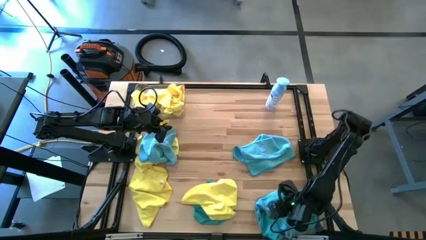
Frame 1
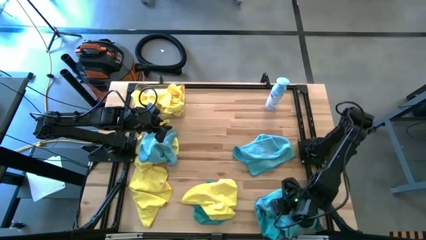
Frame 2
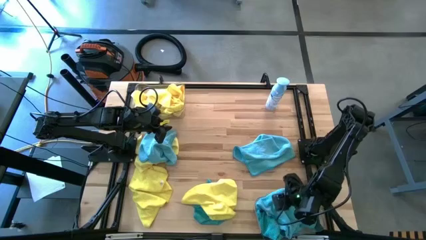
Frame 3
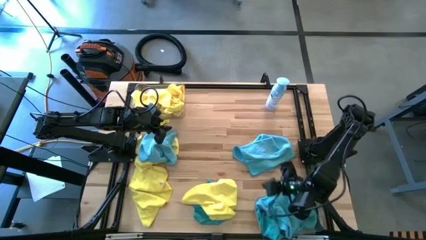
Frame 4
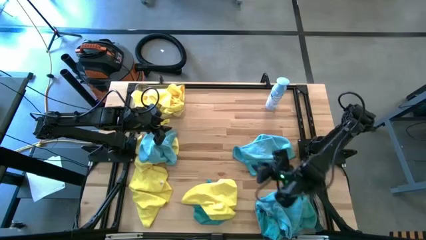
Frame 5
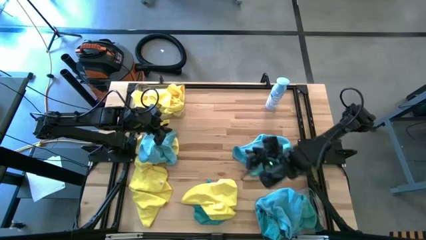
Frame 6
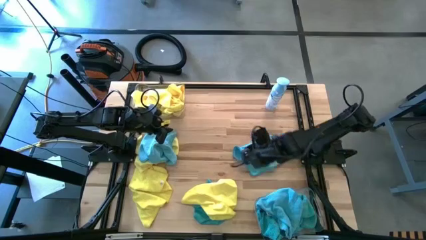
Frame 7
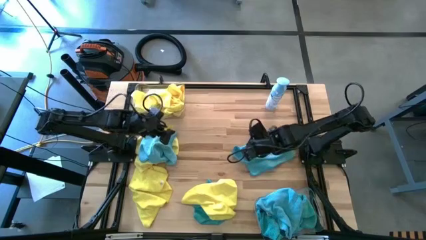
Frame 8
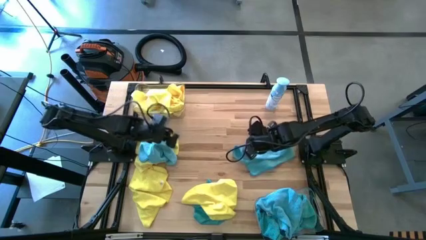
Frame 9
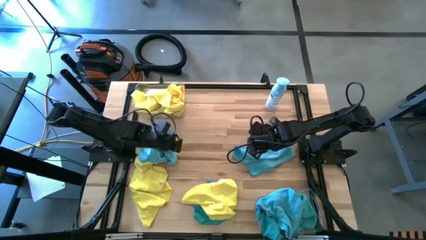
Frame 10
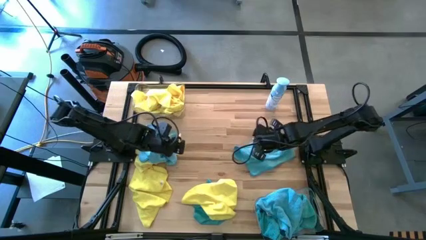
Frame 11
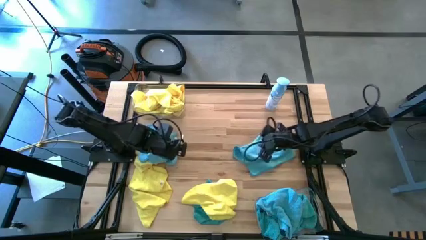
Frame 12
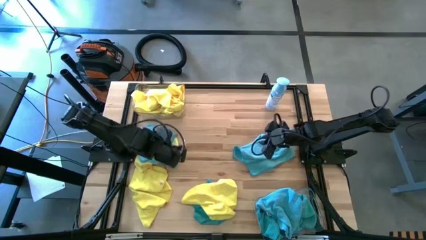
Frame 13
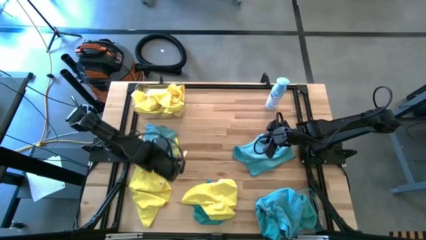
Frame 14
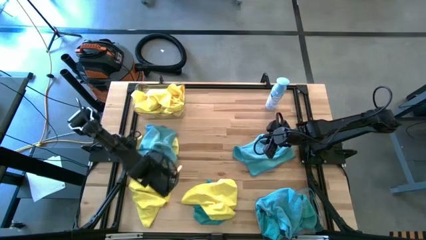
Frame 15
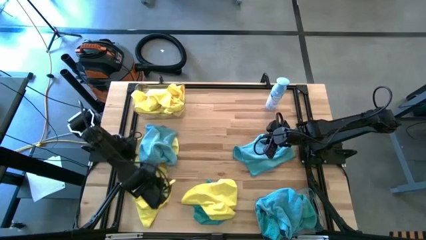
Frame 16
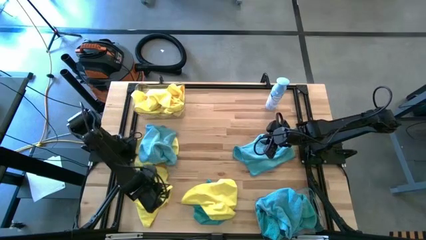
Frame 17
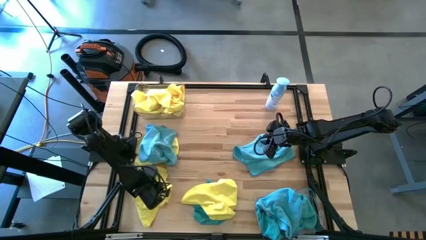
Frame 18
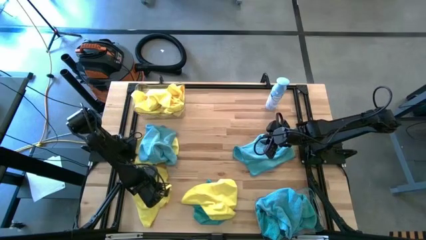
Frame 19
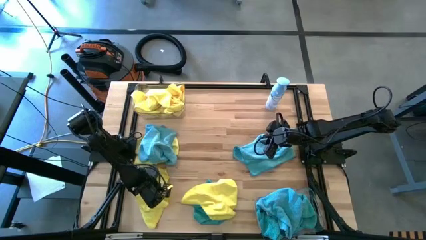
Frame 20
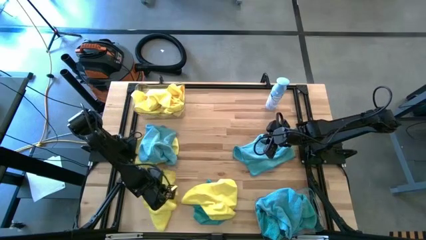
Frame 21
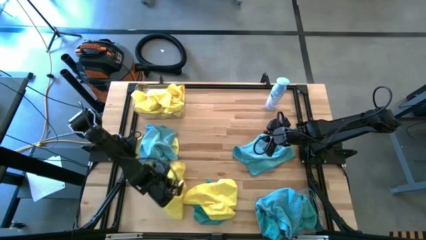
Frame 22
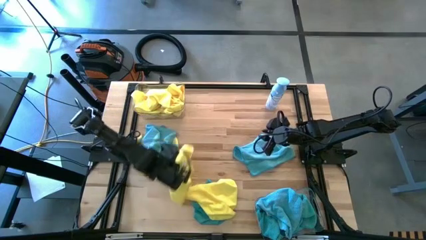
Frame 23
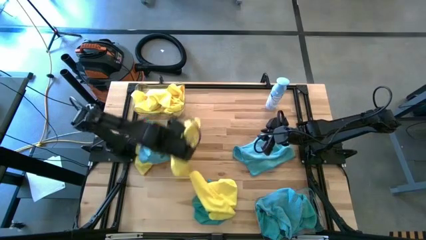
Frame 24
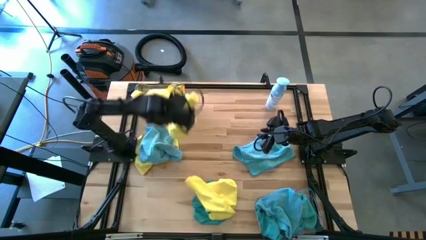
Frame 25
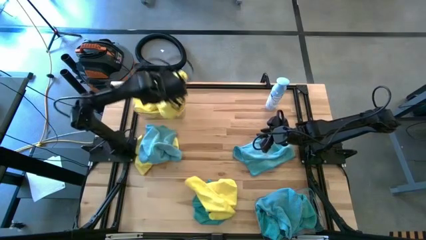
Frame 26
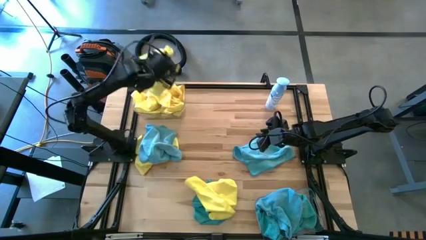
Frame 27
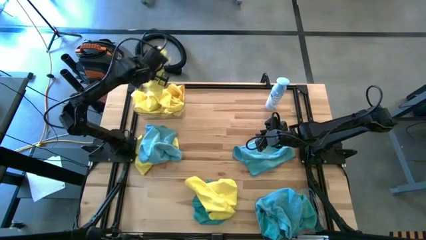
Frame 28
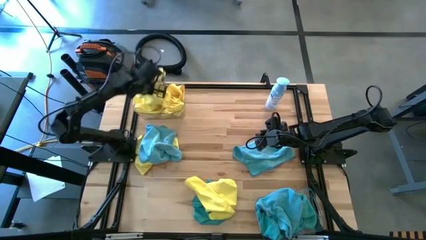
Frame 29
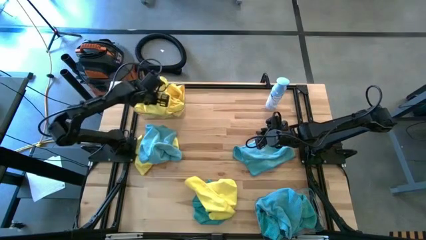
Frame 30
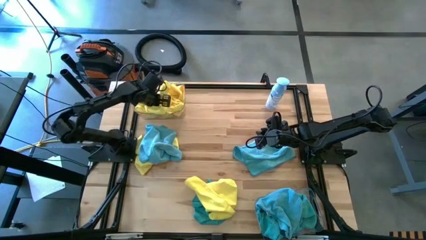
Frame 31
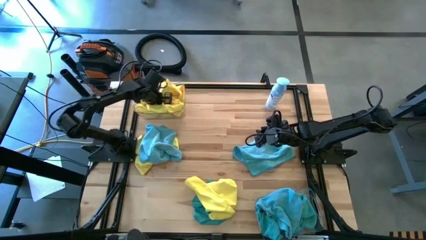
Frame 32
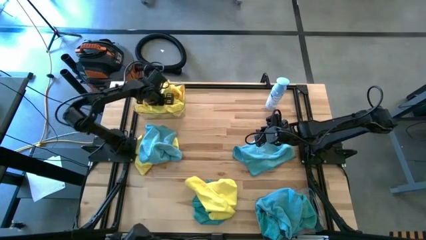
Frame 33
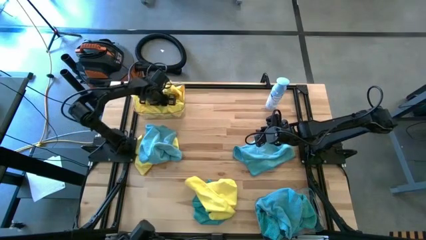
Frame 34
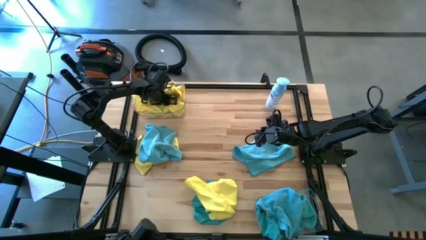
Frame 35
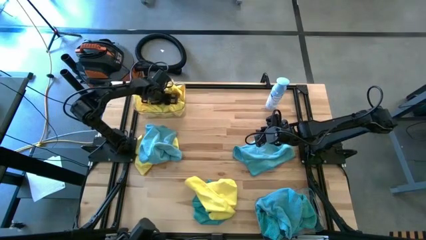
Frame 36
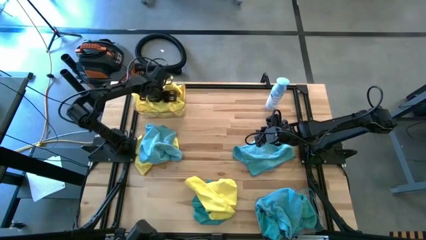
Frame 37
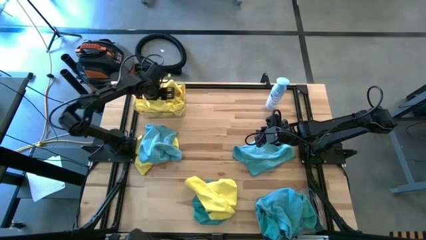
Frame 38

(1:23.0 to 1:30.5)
Task: Sort microfiber towel by color & place in baskets
Put the yellow towel into the top transparent bin

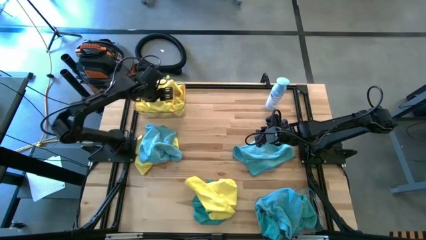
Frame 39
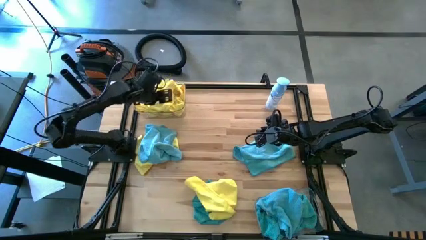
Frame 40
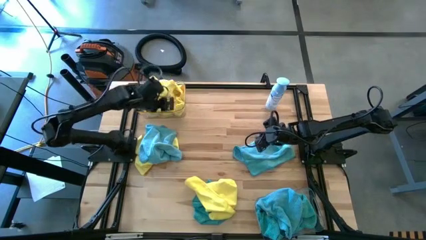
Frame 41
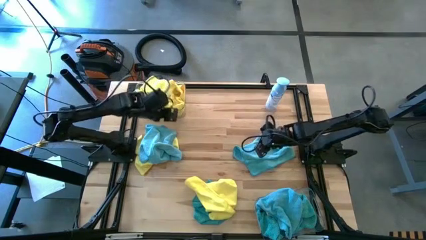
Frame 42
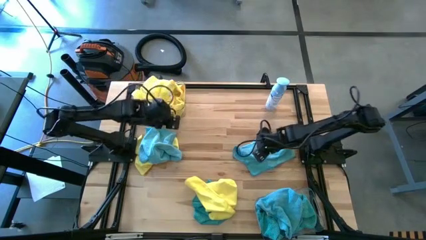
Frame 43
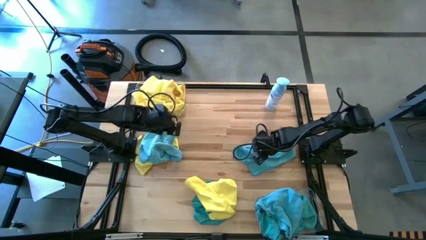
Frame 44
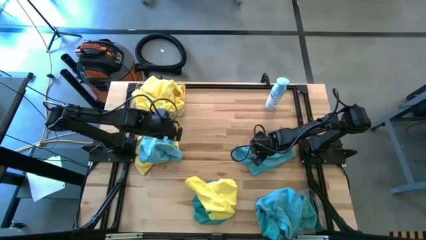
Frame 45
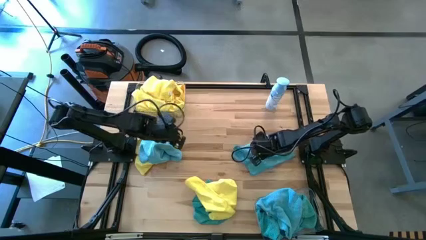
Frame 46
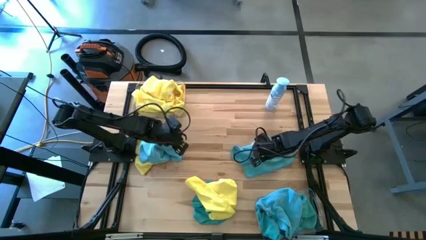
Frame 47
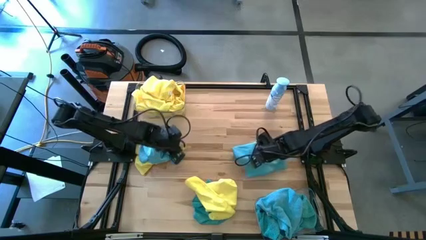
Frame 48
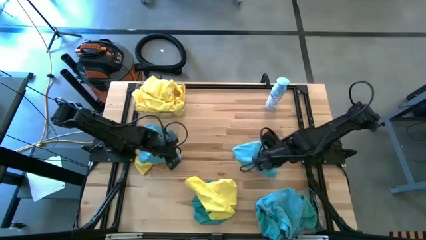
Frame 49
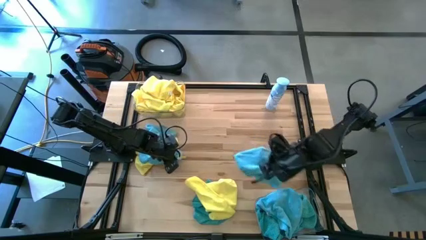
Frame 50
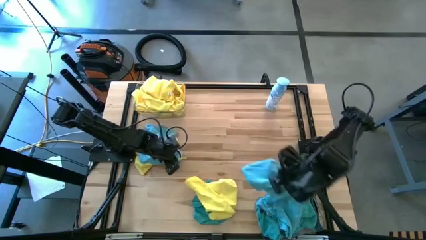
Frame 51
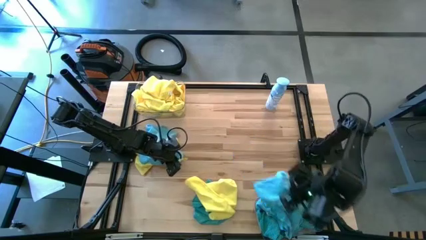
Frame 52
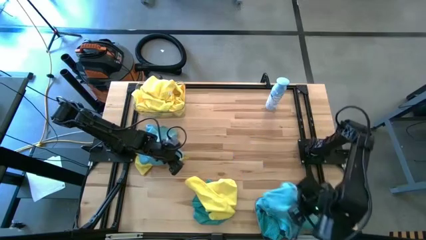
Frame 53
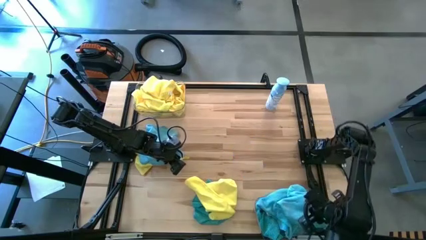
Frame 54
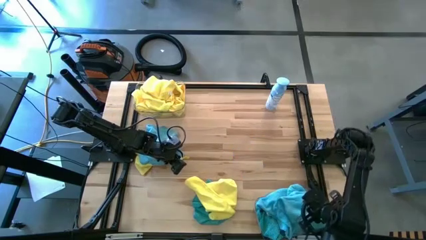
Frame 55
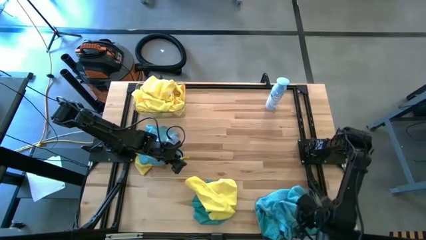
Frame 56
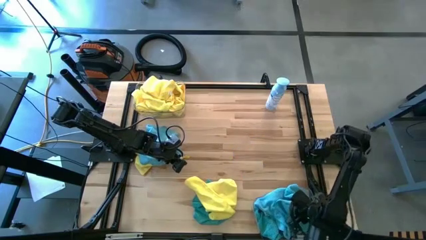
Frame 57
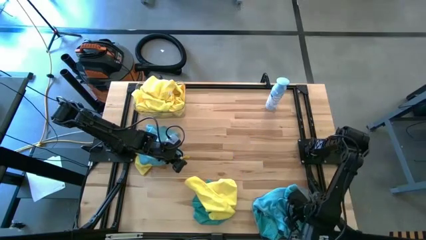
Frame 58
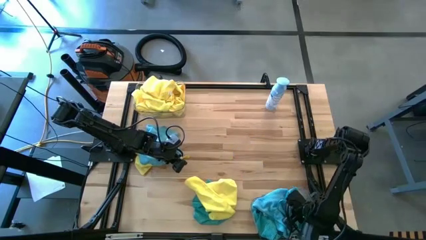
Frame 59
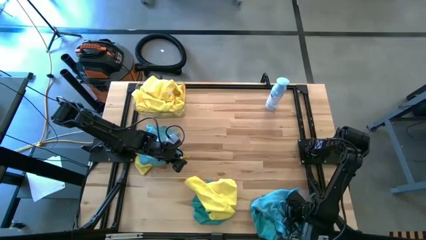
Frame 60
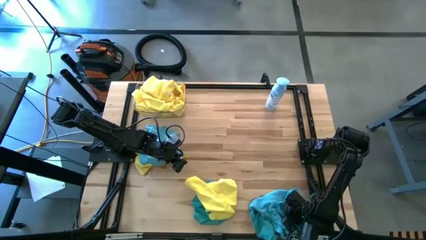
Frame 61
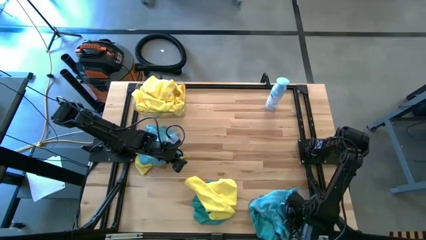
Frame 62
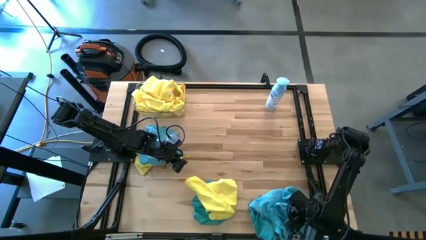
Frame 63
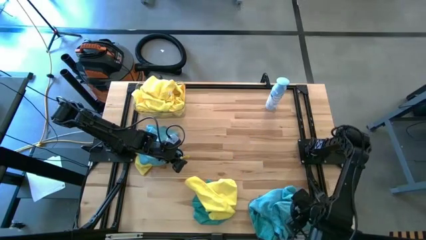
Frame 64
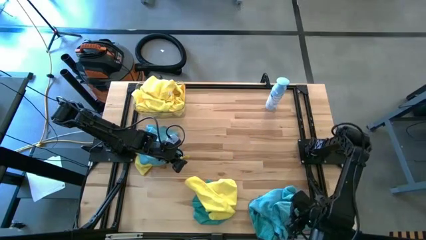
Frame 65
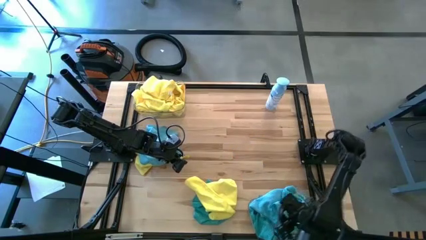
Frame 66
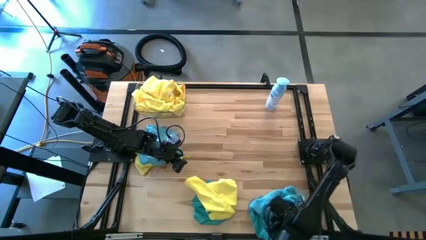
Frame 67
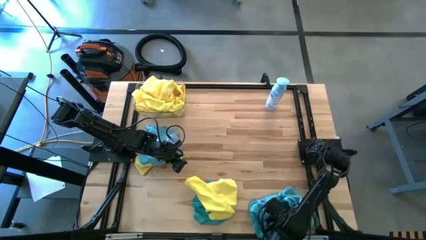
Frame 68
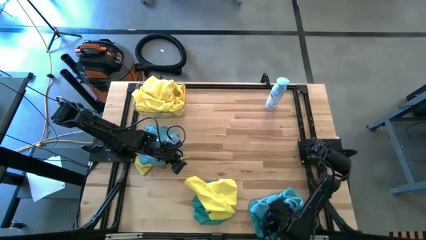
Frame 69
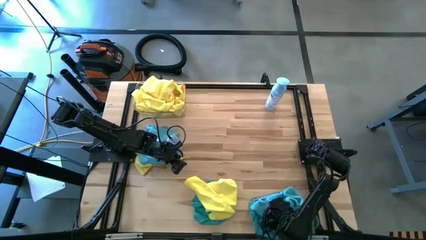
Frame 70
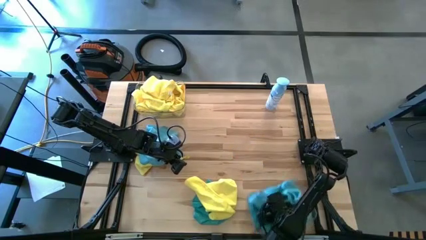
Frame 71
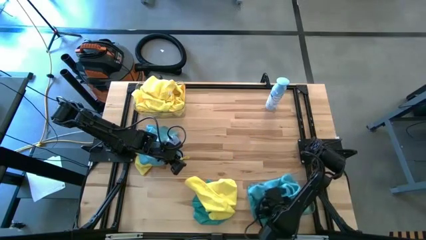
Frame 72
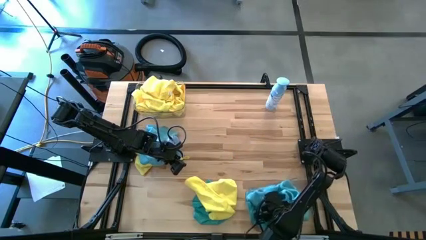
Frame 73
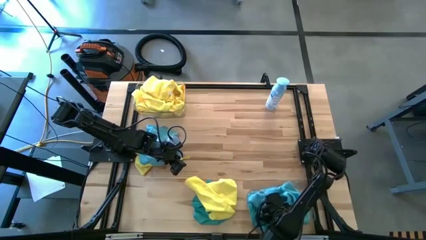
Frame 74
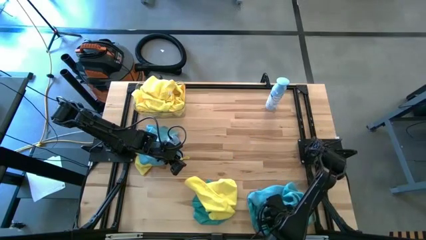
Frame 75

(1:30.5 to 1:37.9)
Put the blue towel into the bottom transparent bin

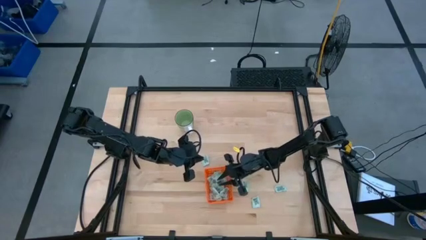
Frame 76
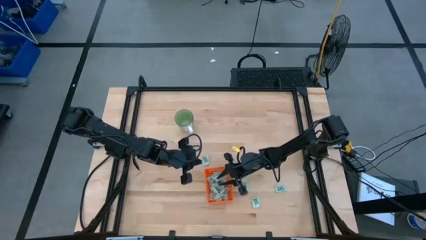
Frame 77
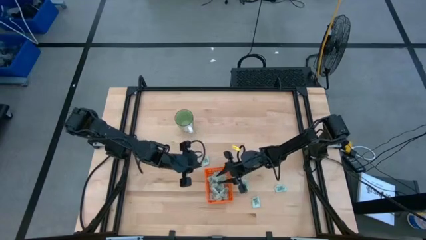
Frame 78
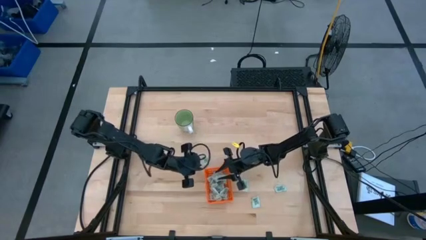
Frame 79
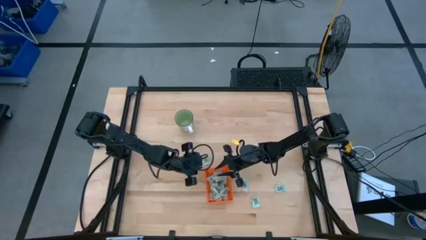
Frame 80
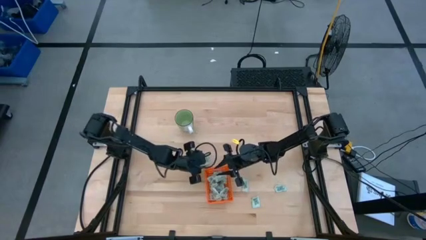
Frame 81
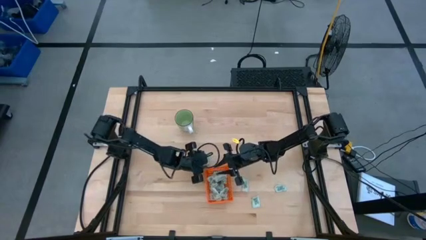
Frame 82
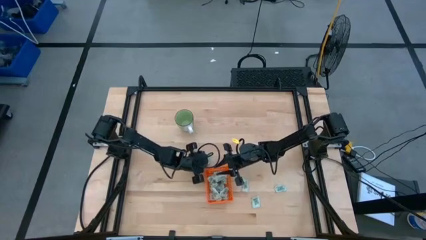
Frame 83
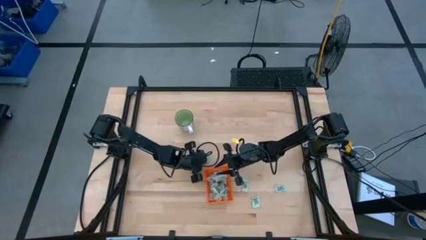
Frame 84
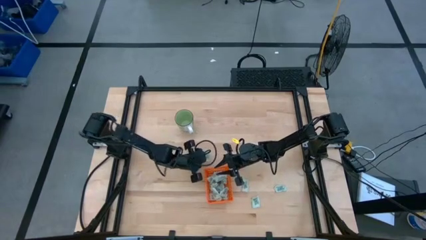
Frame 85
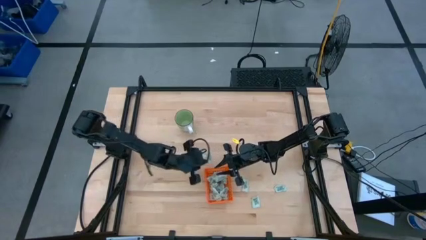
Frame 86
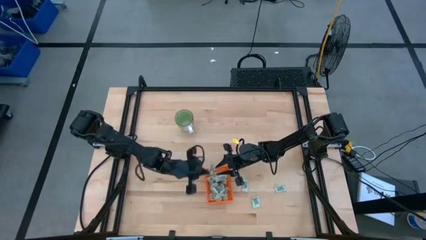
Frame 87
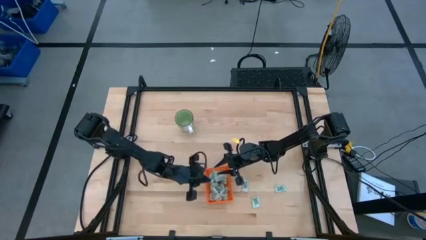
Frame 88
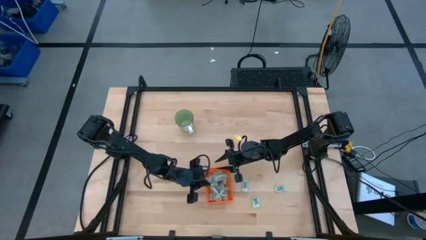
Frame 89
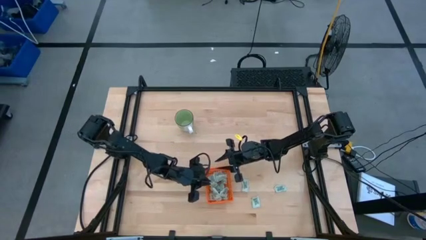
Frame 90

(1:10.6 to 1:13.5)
Task: Pick and place Stevia / Truvia into bins
Put the stevia packet into the orange basket
